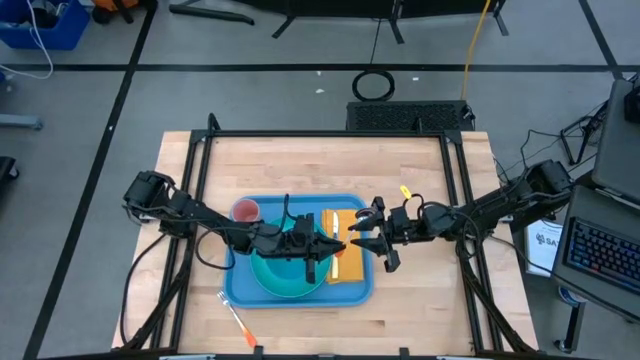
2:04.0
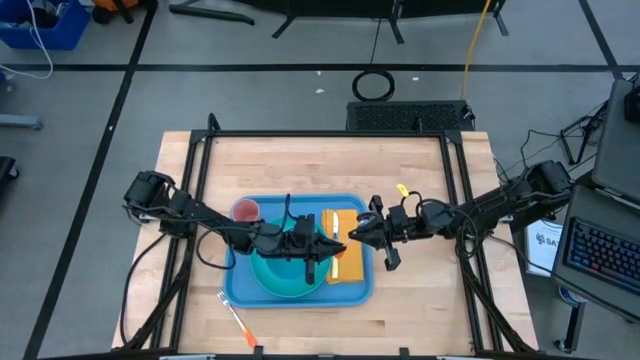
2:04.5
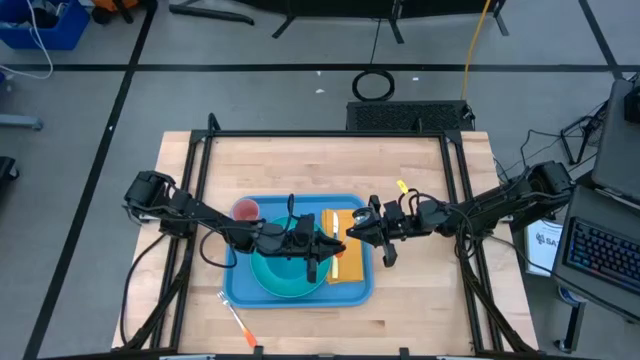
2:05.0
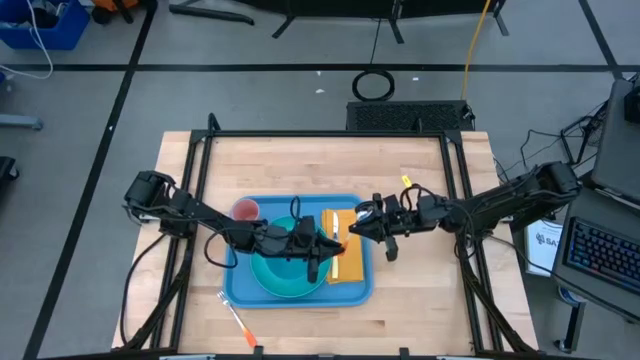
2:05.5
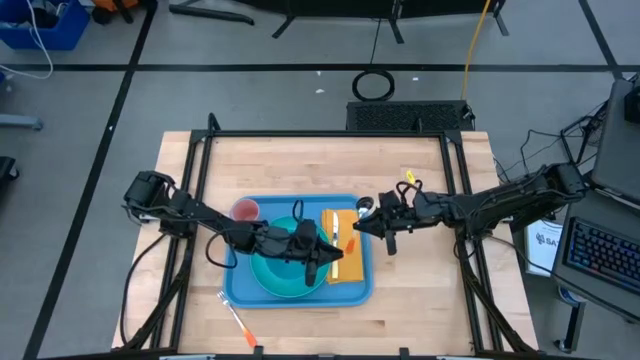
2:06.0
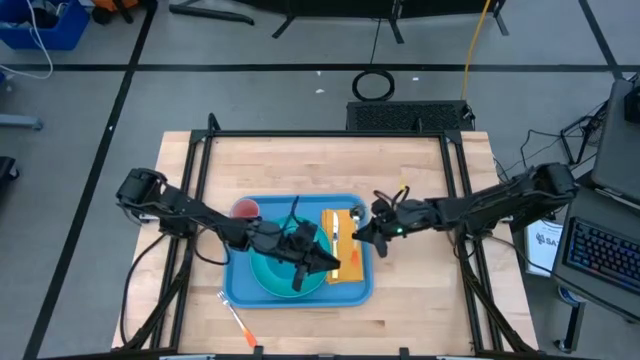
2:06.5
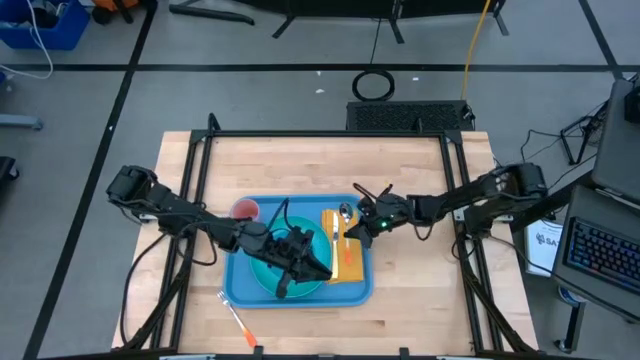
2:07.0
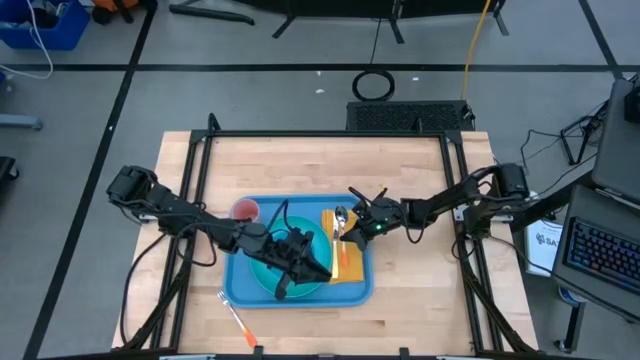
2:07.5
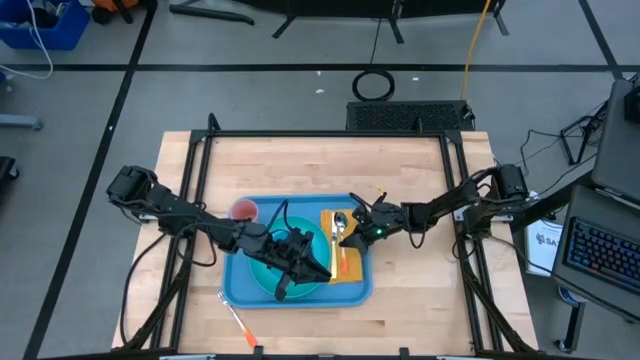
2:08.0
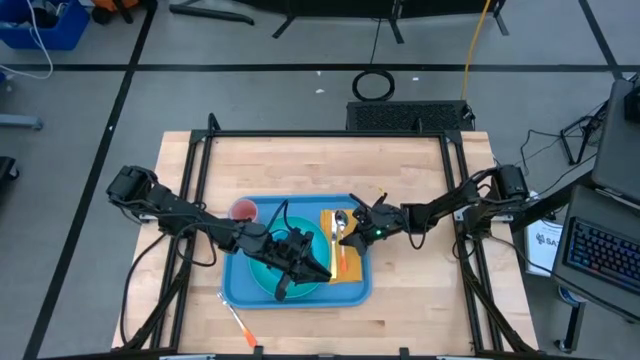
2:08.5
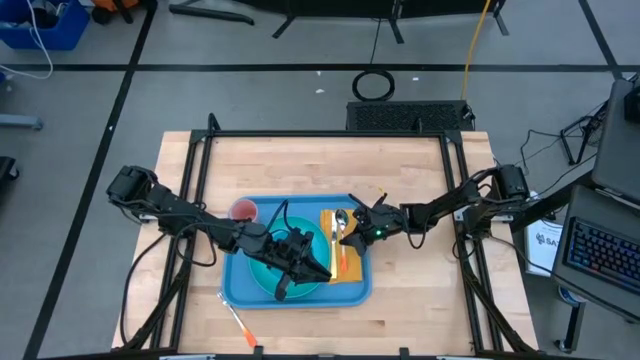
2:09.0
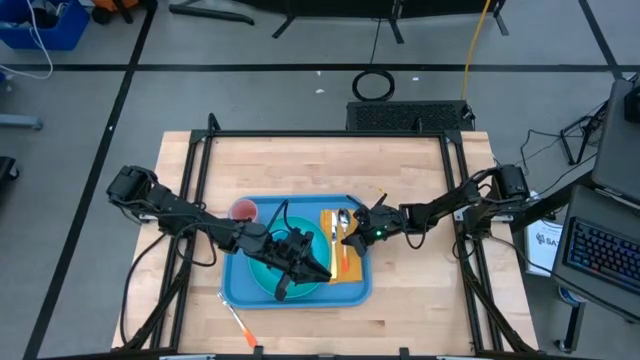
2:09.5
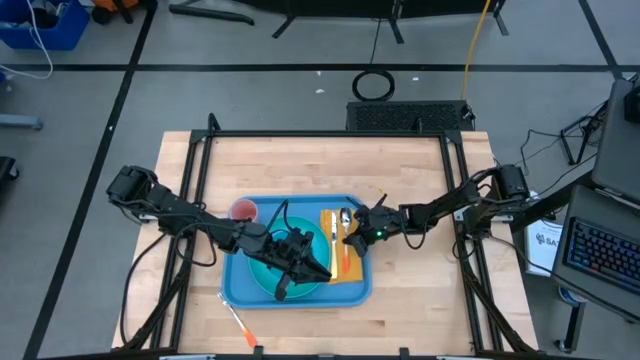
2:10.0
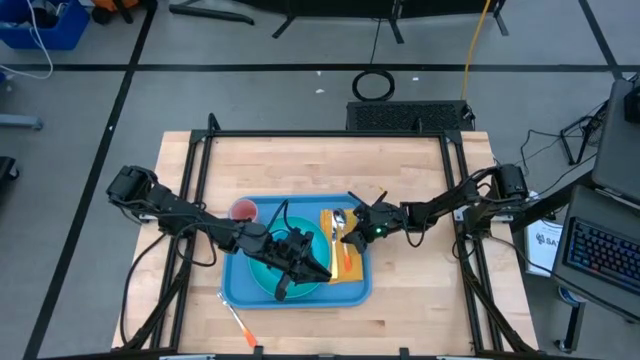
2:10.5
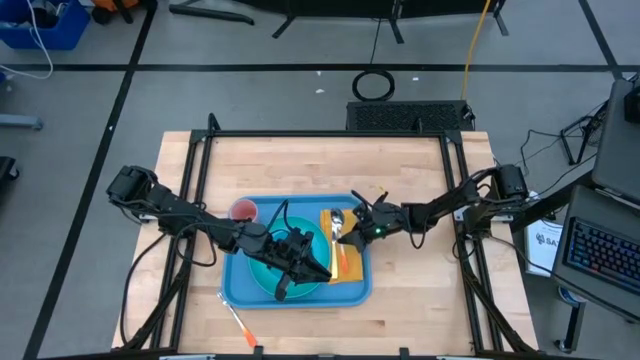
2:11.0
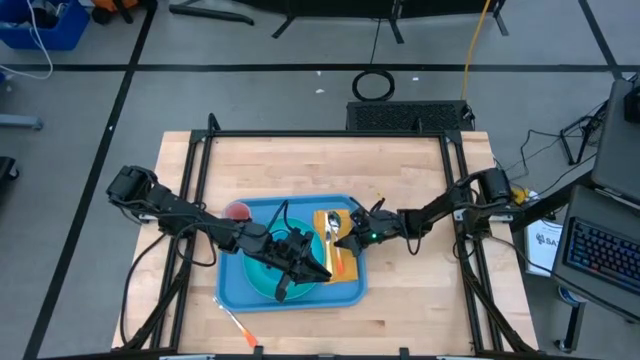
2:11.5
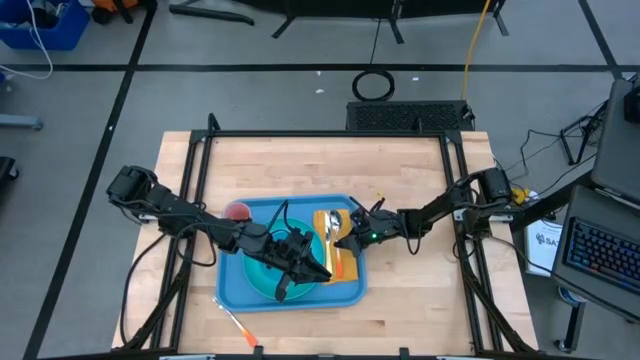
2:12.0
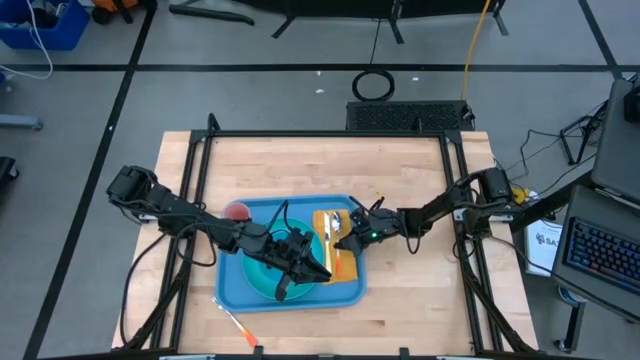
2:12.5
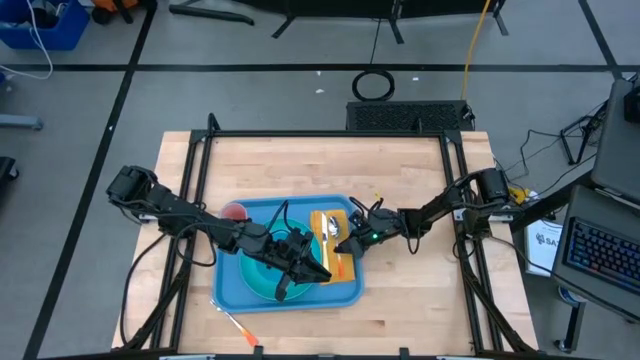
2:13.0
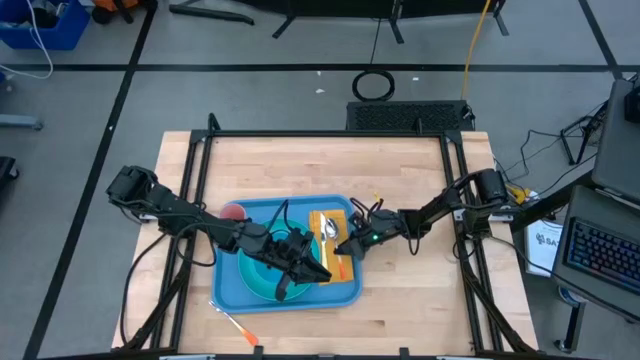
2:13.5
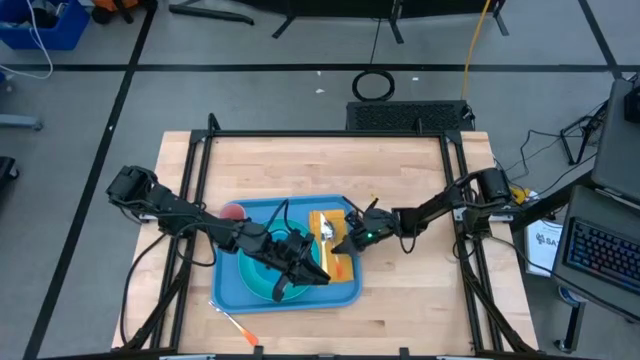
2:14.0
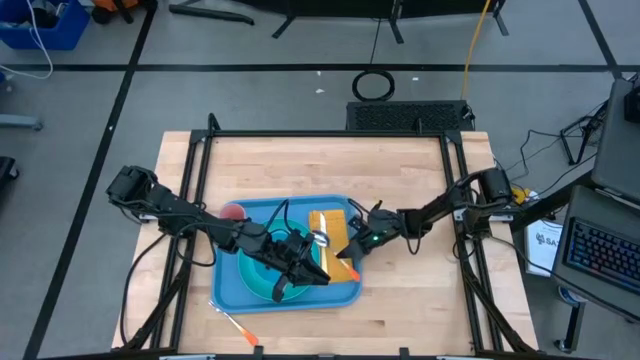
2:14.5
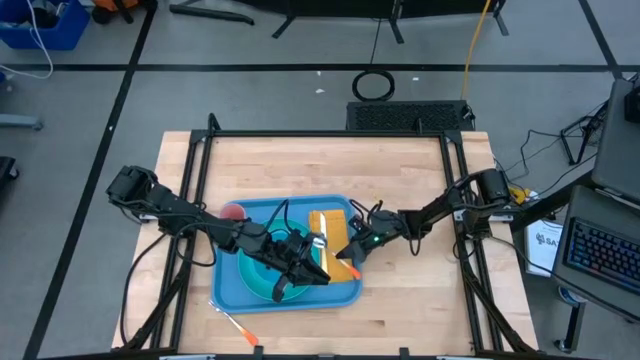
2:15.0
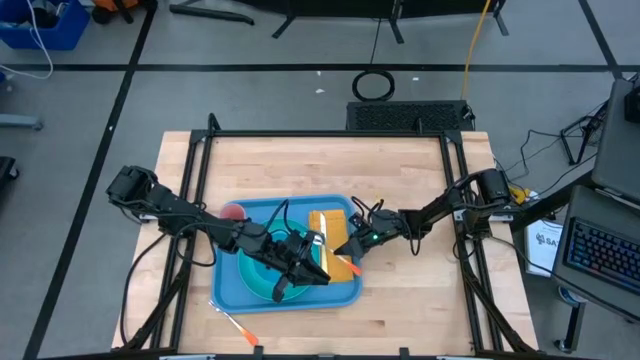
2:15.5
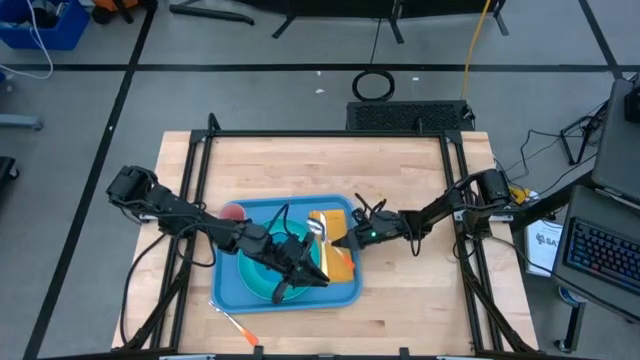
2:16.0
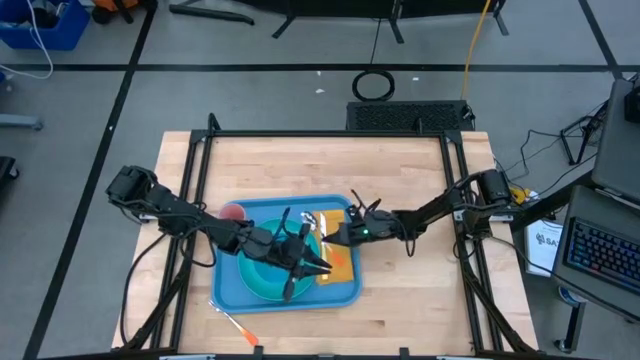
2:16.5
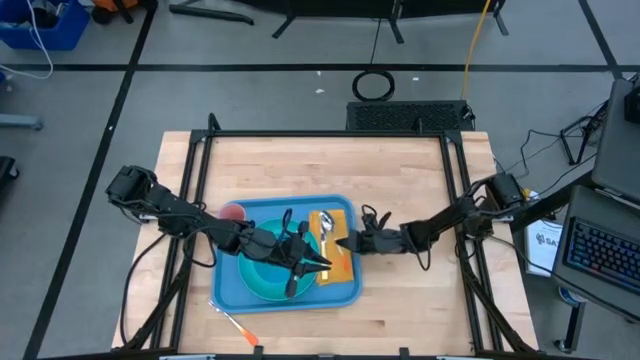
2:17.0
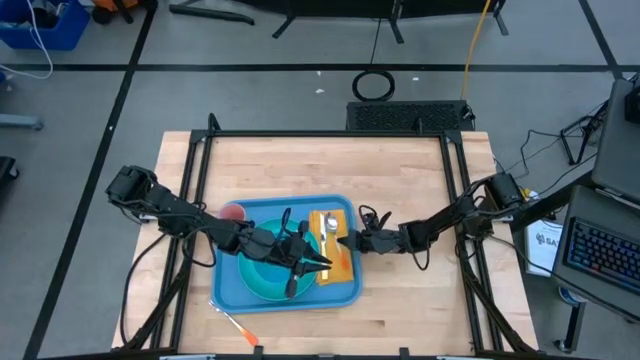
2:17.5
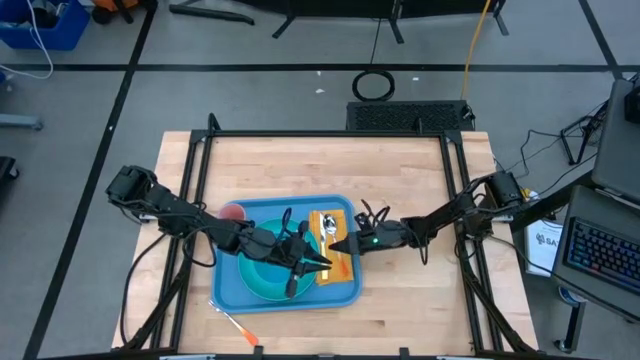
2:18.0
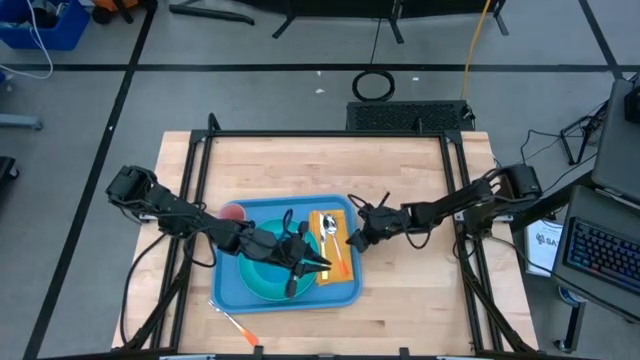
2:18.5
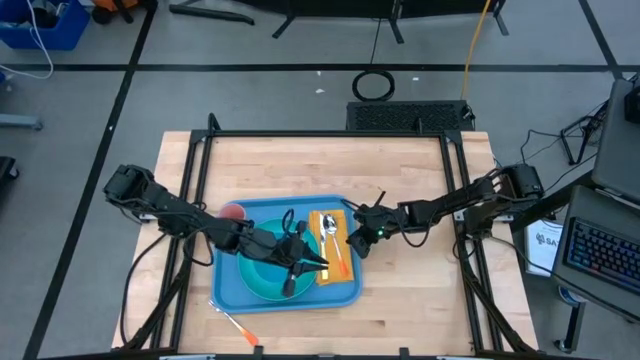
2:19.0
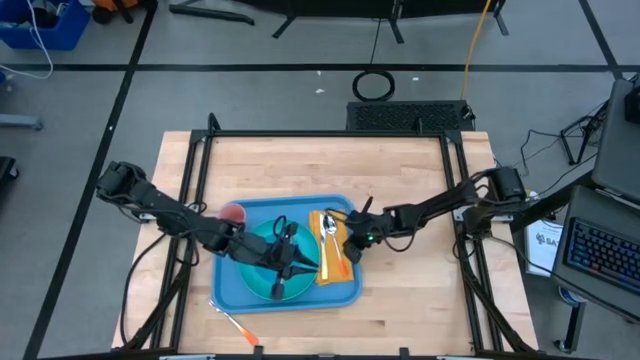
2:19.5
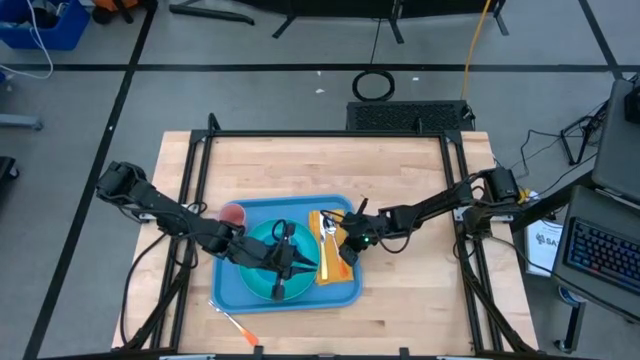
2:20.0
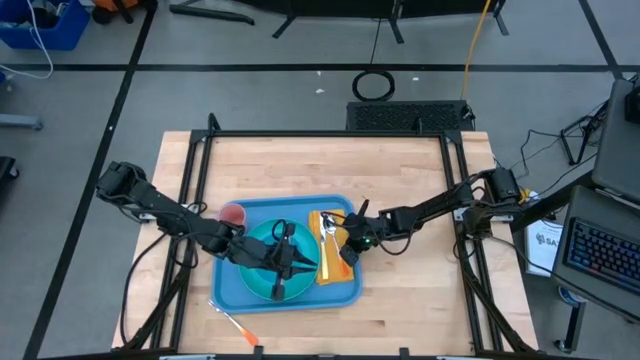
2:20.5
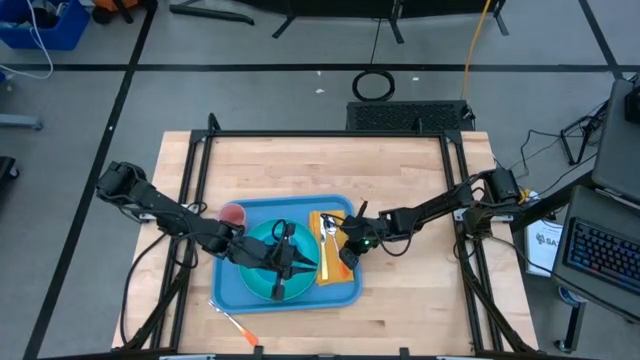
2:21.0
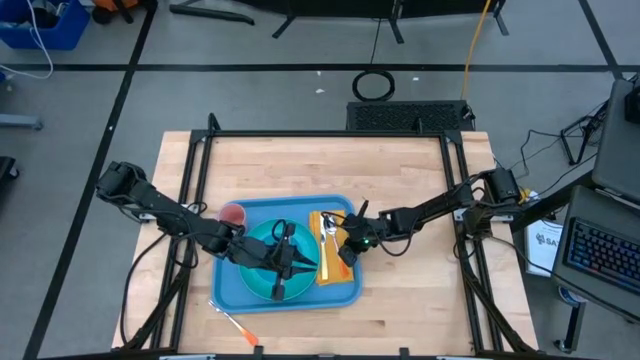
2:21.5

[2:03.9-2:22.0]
Task: Set up tray
Put the orange spoon on the yellow napkin to the right of the yellow knife

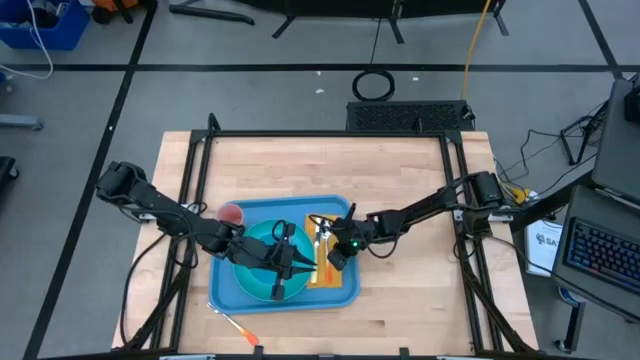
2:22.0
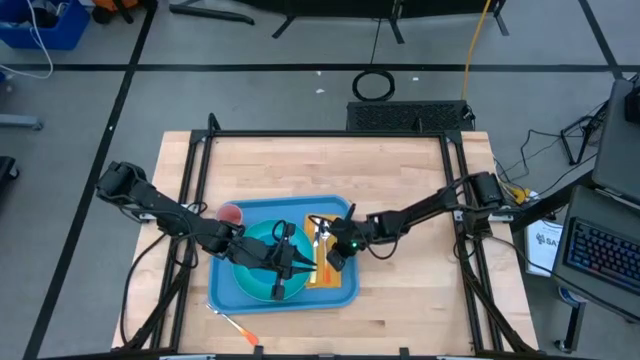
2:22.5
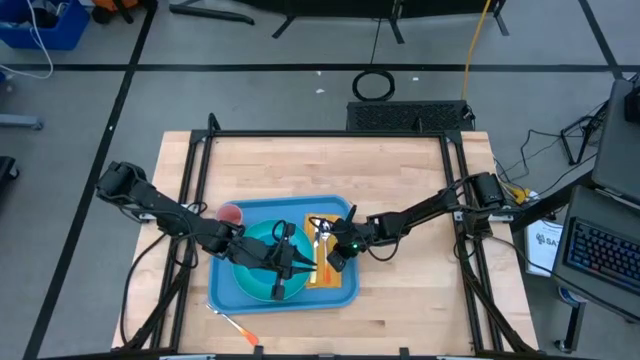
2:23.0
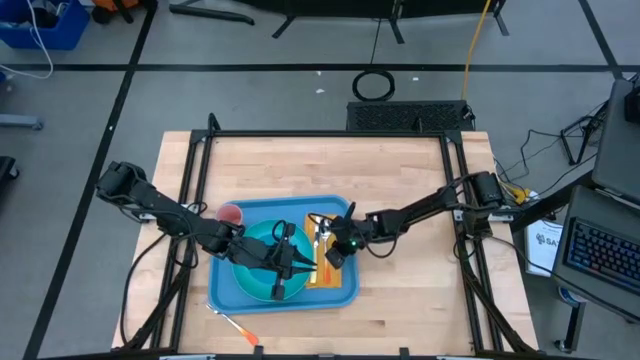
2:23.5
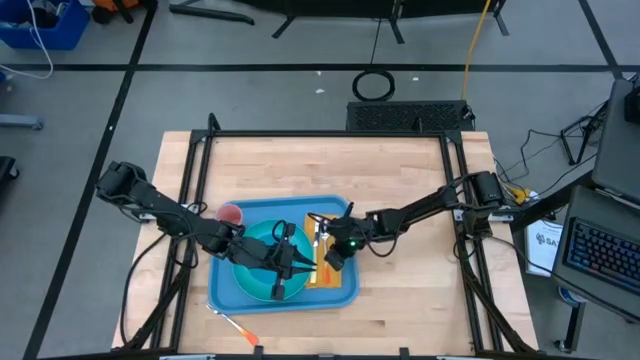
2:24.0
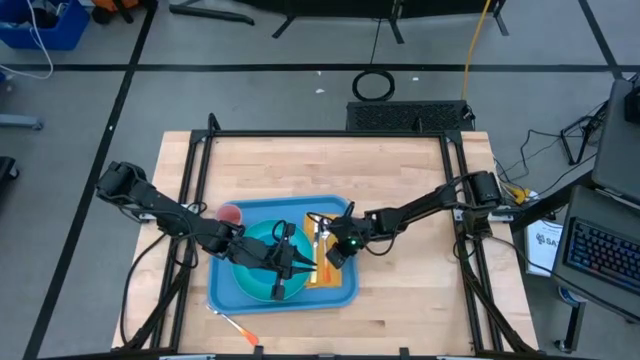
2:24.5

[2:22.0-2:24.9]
Adjust the yellow napkin on the blue serving tray

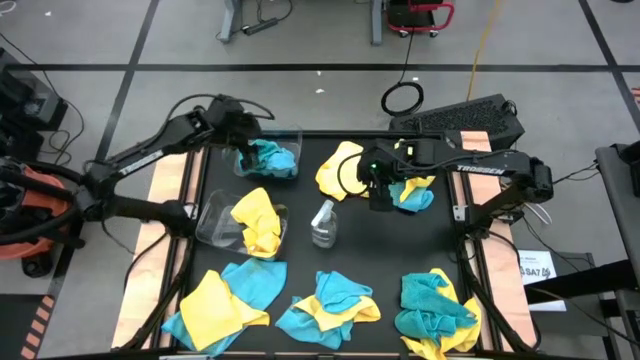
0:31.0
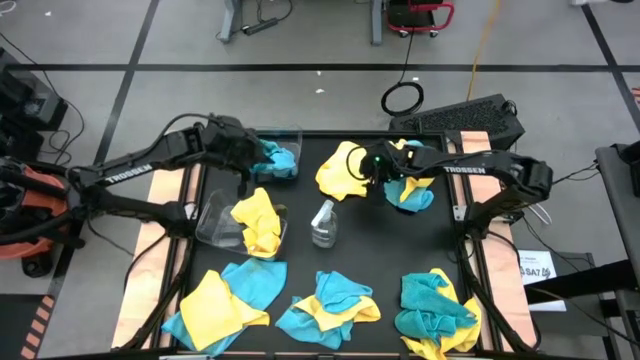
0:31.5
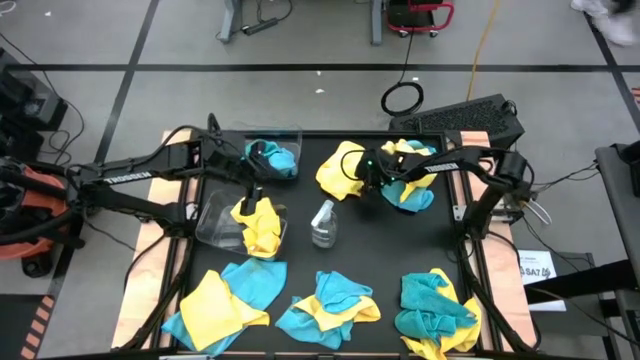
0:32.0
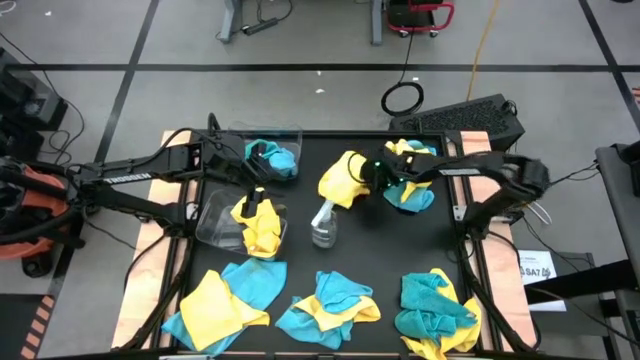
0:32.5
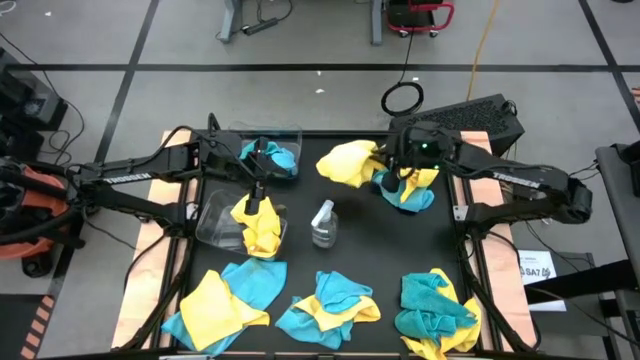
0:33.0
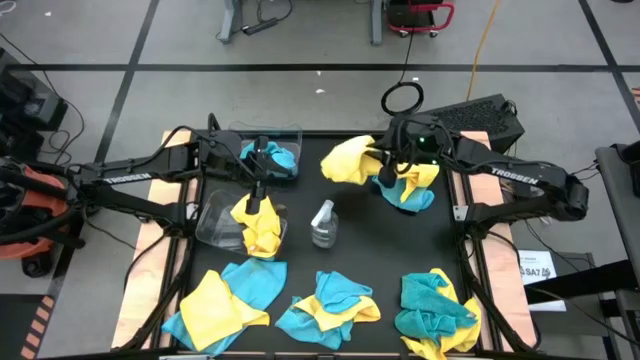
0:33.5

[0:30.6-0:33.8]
Task: Sort microfiber towel by color & place in baskets
Put the yellow microfiber cloth into the bottom transparent bin
